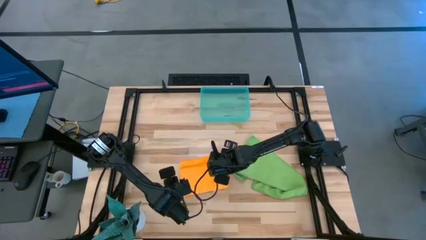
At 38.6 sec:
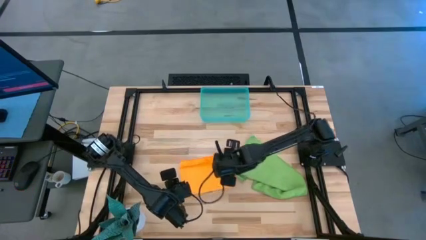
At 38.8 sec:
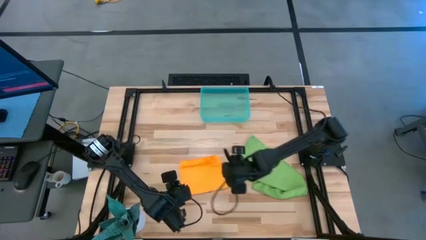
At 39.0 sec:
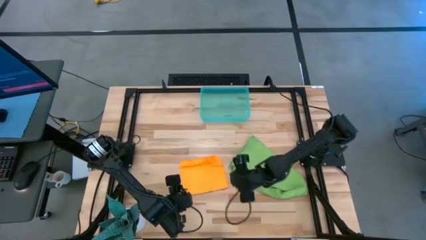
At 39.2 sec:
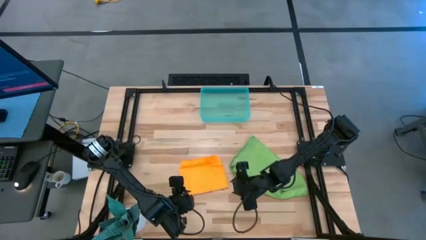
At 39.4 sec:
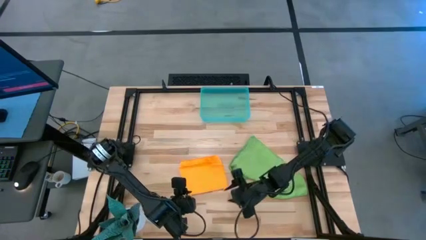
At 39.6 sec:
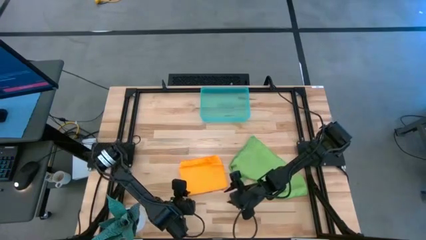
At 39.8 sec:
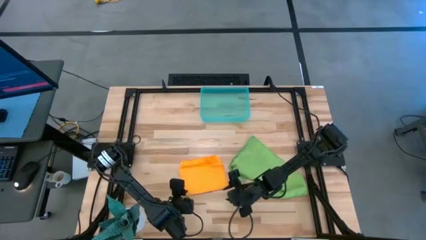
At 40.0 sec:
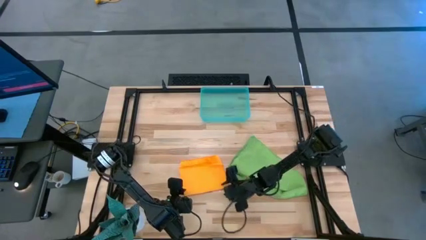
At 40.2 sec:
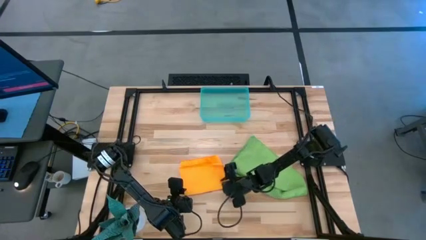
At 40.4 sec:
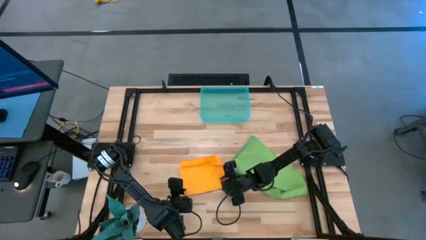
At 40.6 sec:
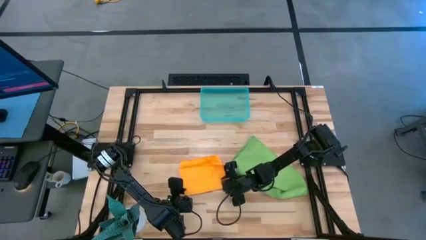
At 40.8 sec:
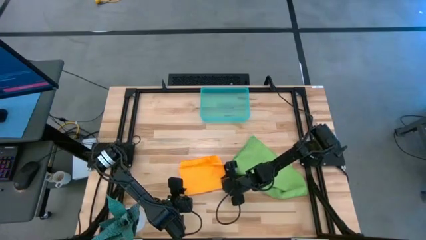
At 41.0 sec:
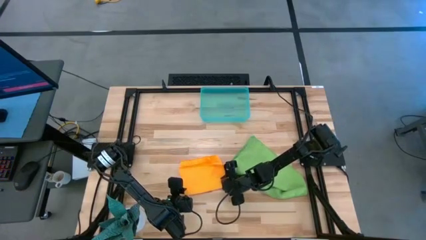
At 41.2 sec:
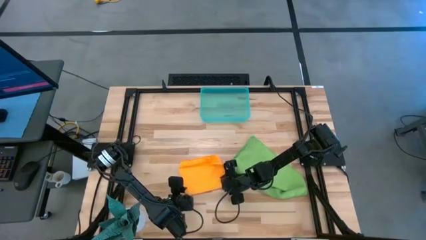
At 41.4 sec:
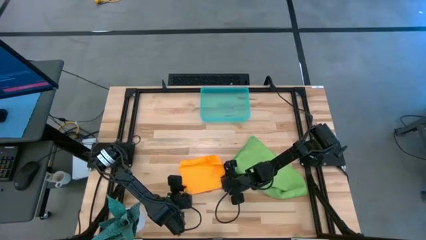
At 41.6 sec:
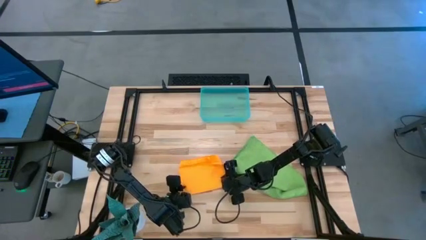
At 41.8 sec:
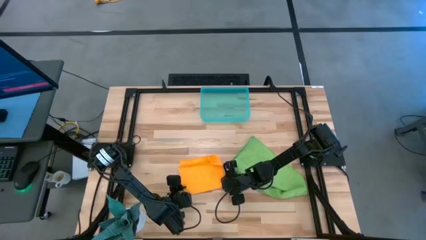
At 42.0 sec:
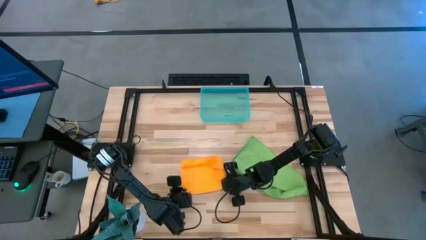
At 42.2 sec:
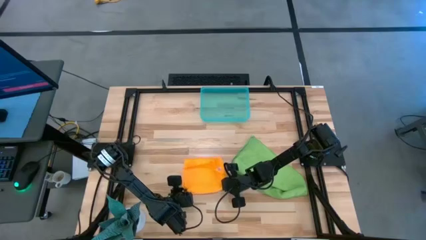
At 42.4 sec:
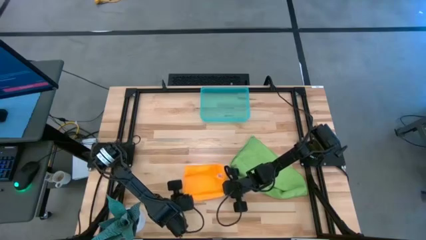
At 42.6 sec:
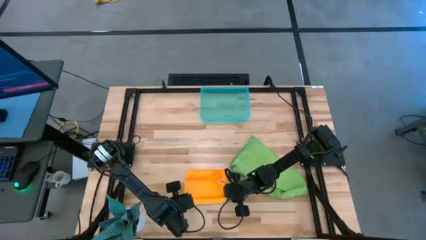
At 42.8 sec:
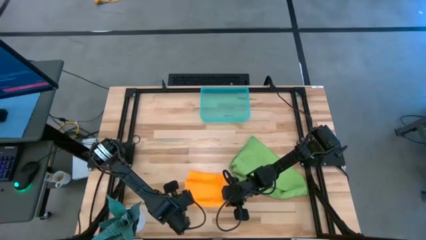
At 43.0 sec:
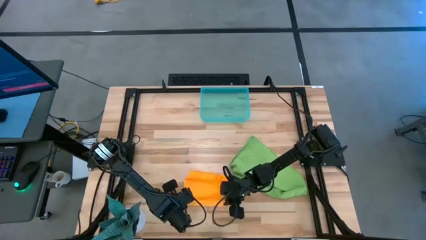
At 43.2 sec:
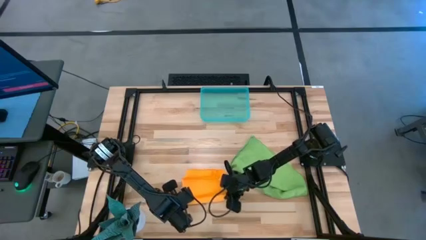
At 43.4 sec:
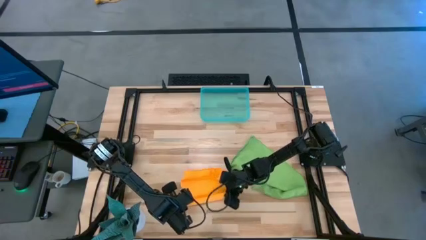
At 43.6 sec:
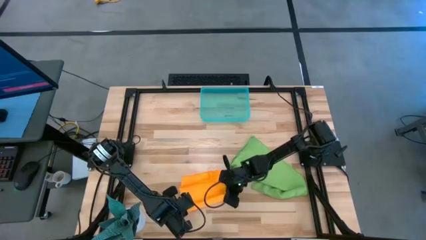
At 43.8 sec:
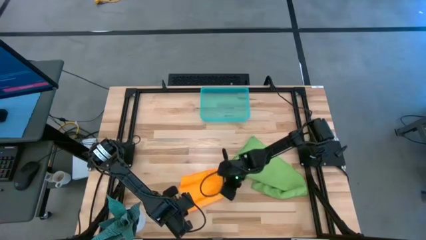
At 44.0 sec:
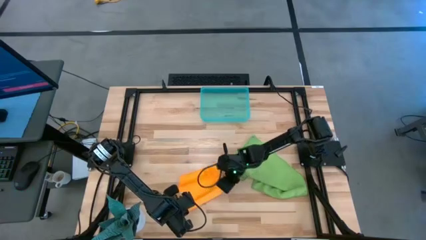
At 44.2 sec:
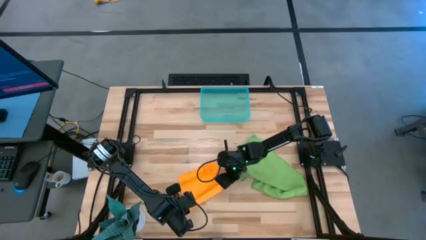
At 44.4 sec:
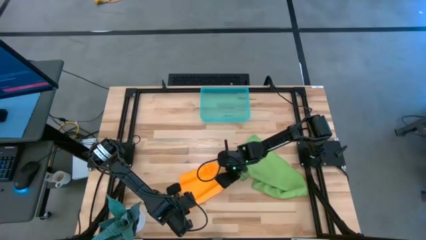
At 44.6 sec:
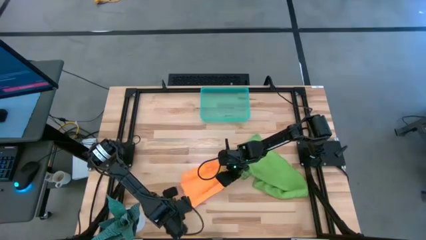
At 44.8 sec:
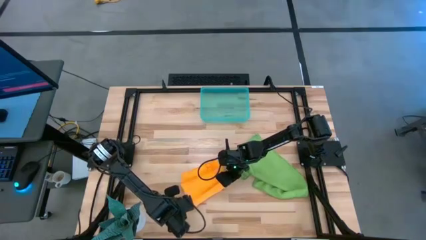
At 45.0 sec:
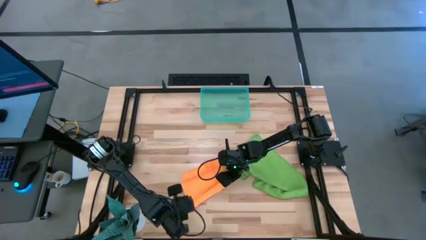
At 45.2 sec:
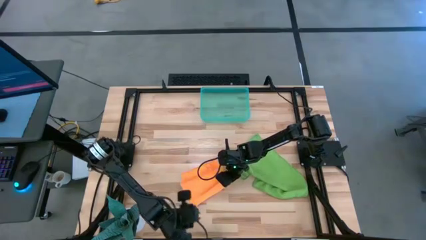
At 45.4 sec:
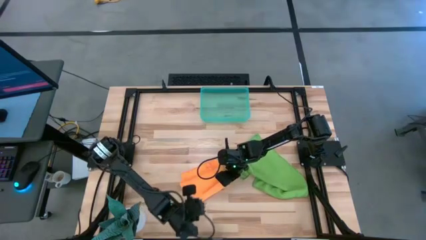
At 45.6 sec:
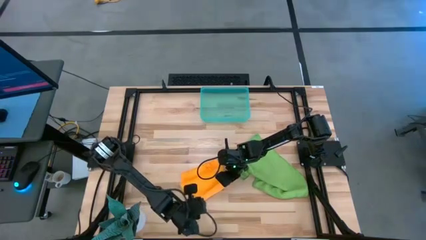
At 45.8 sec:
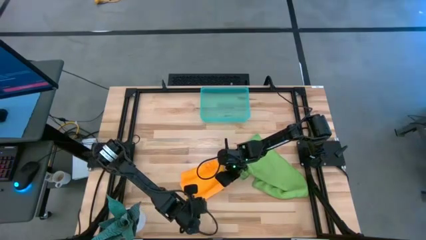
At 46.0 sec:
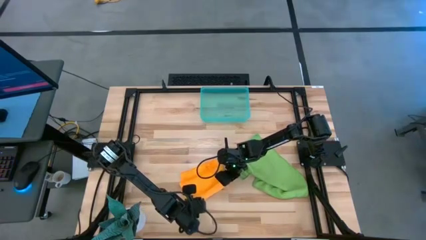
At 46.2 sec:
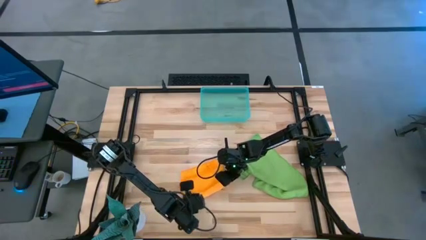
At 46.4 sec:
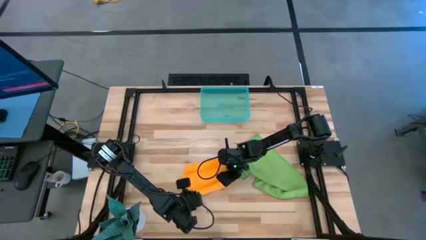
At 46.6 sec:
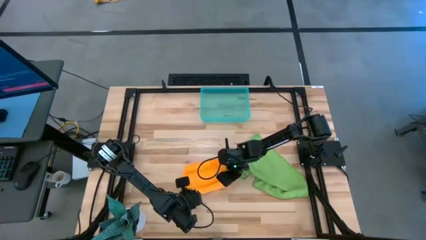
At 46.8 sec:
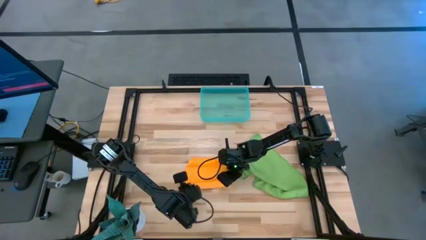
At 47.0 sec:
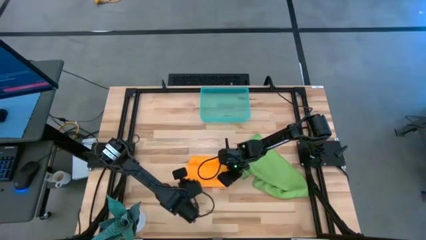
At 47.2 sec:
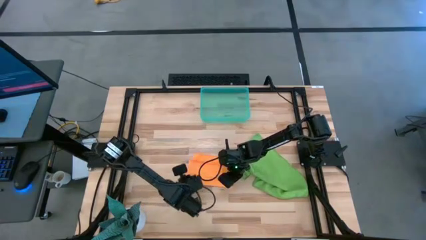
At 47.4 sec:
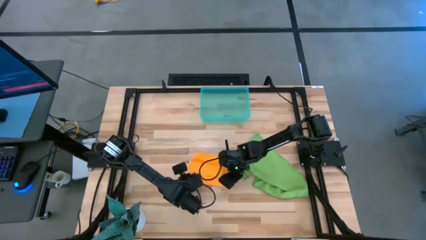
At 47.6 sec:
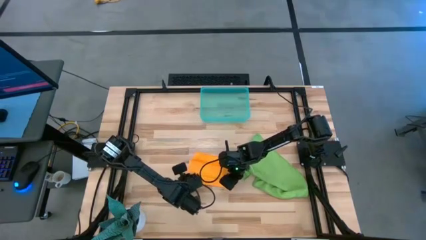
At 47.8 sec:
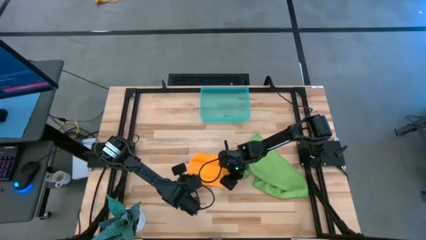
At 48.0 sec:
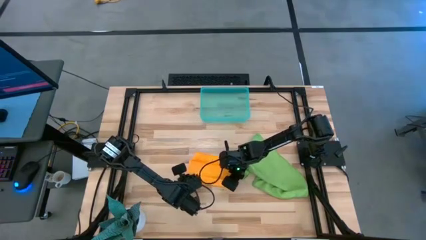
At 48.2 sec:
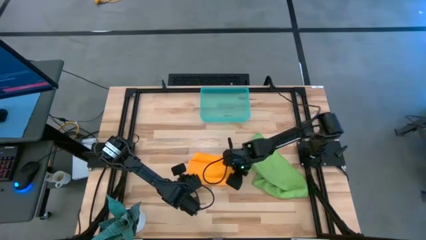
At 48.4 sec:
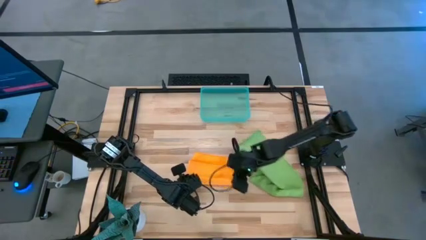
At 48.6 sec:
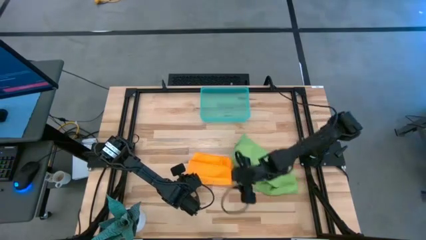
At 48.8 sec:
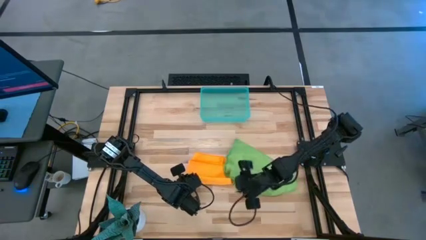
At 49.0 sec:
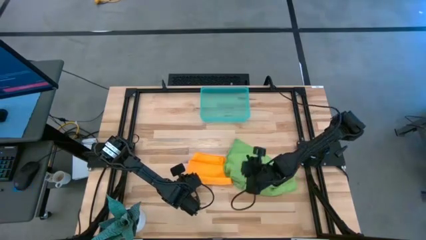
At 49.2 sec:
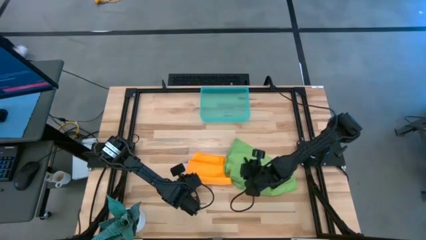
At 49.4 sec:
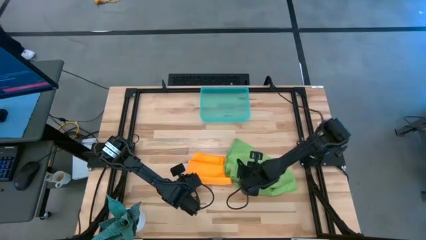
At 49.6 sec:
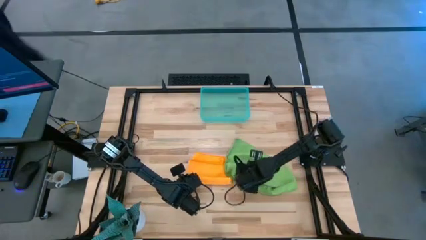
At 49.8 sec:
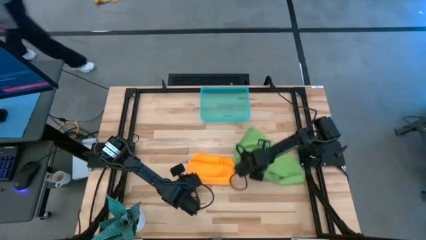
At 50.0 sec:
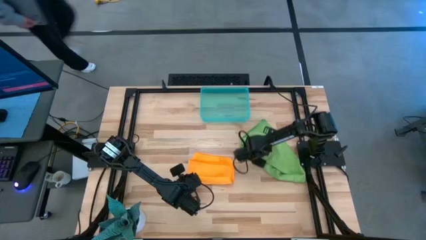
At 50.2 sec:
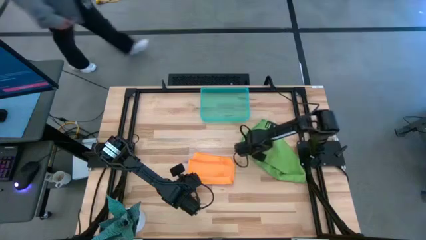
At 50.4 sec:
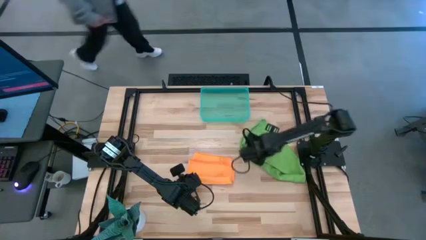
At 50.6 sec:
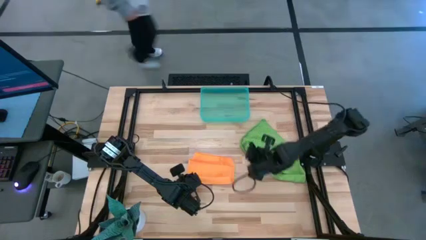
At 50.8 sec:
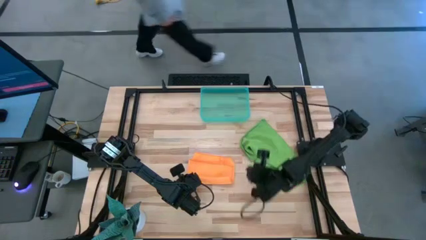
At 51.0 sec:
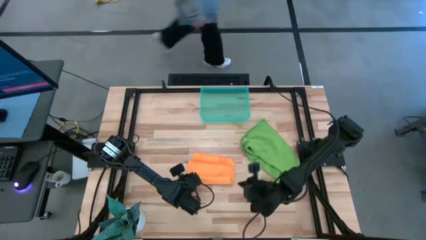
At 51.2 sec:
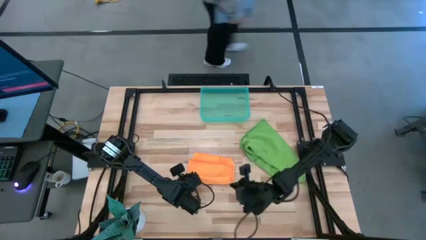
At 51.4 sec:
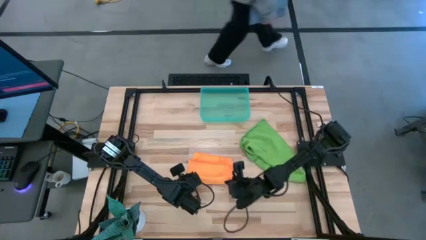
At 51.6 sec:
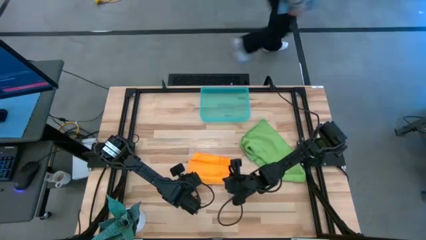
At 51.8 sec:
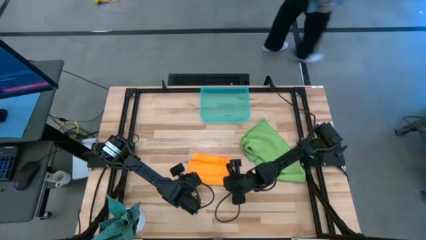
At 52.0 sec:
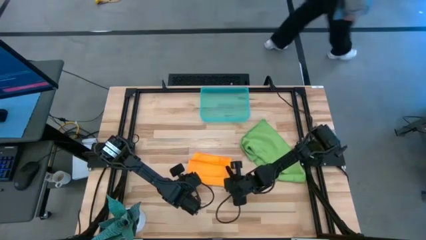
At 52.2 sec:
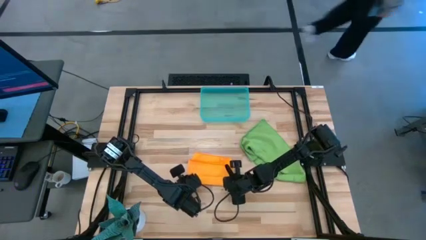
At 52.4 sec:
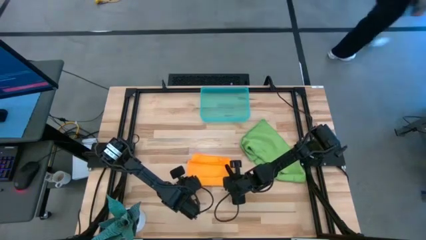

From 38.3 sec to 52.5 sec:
Task: Roll microfiber towels into tight, uniform cylinder then place into a basket
Roll the orange microfiber towel
